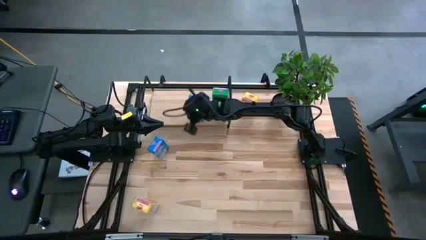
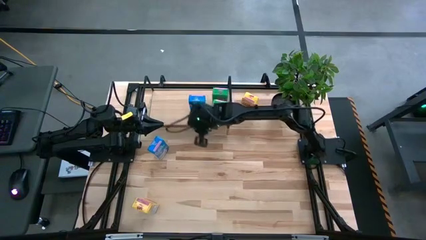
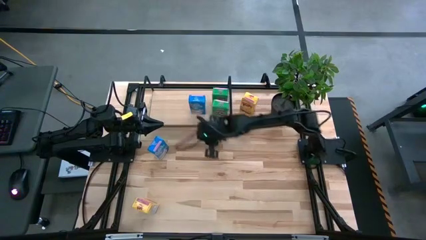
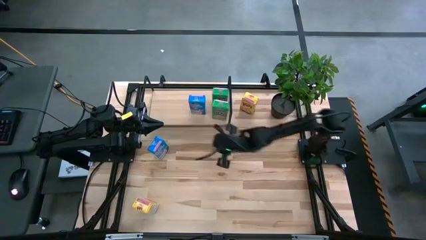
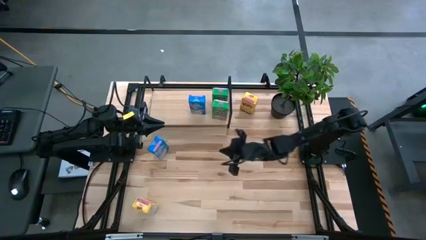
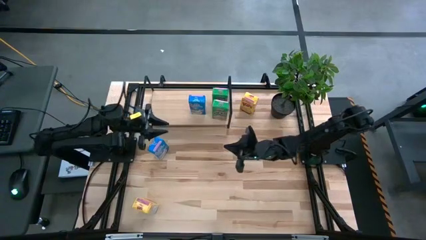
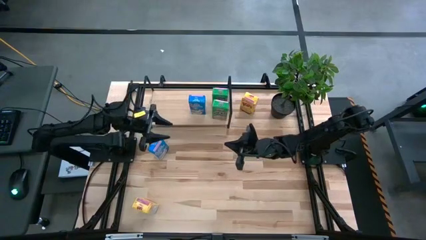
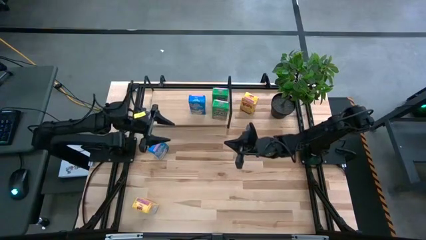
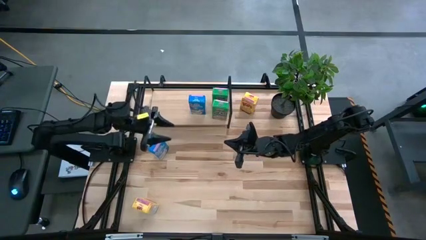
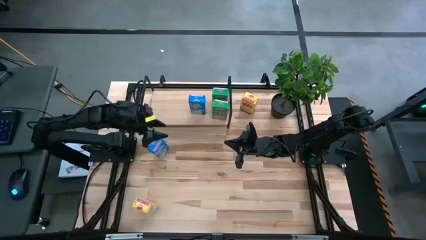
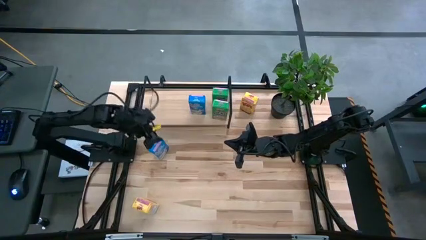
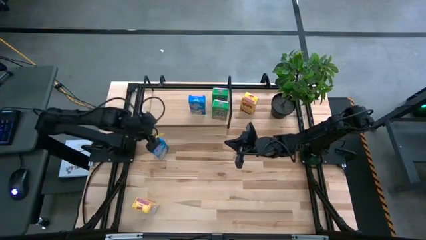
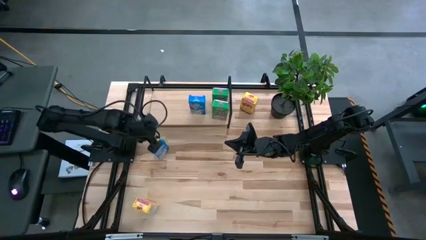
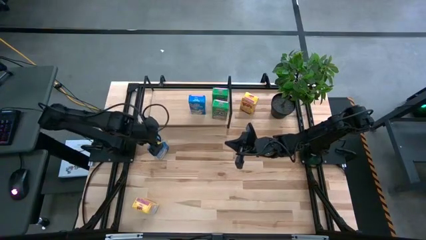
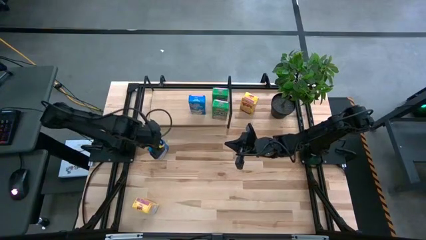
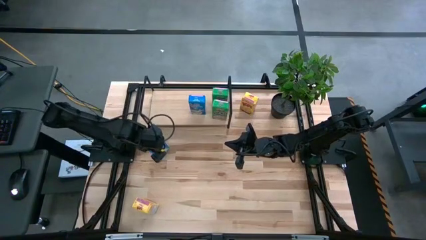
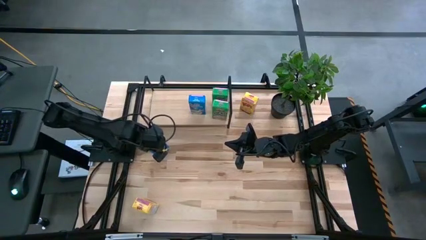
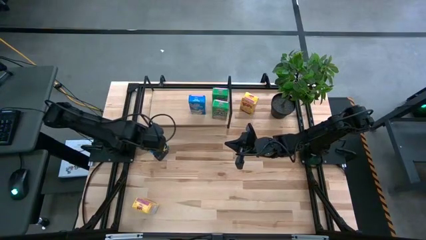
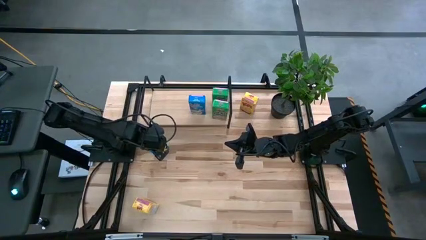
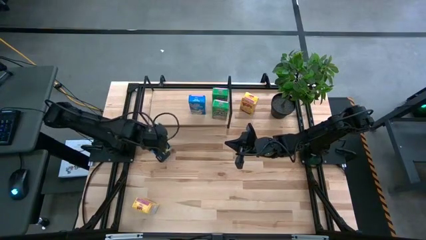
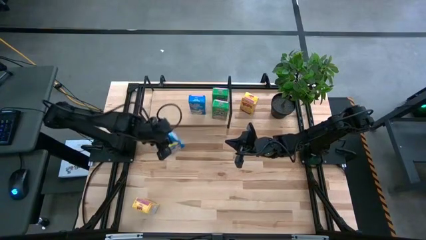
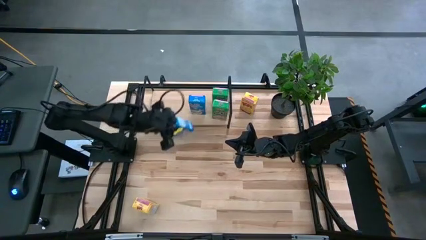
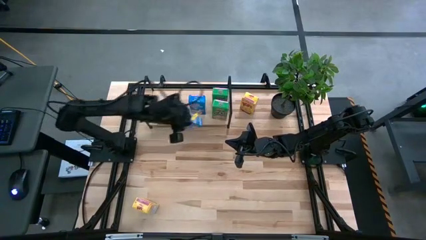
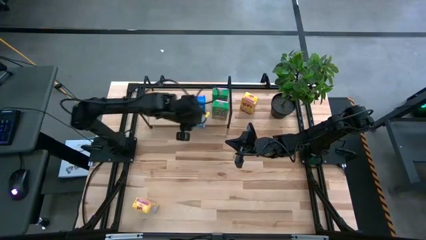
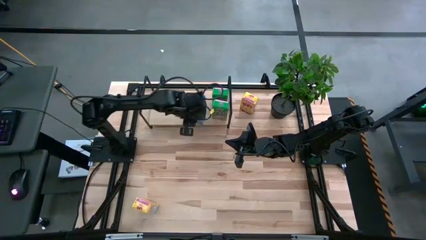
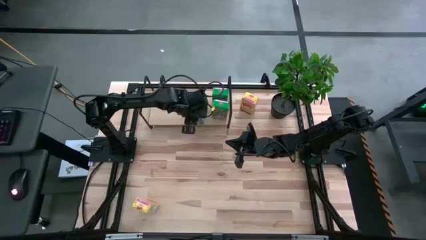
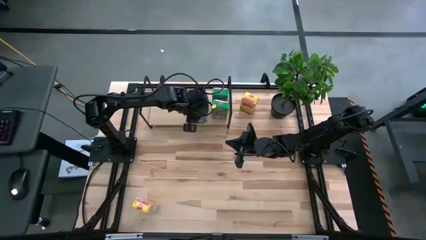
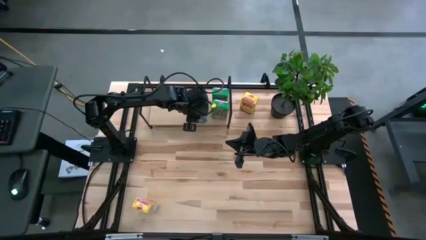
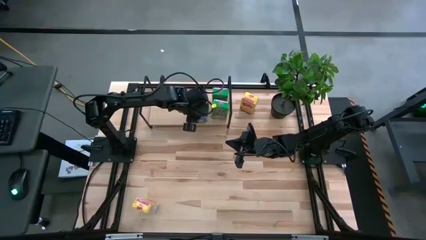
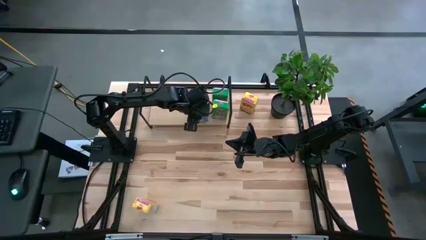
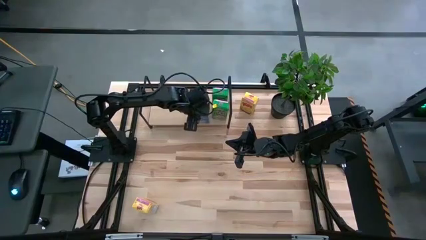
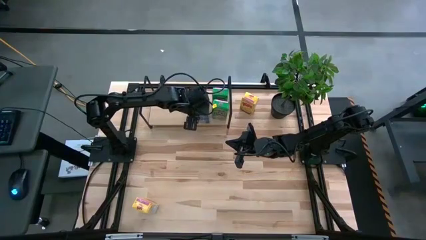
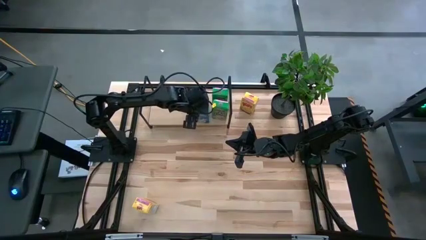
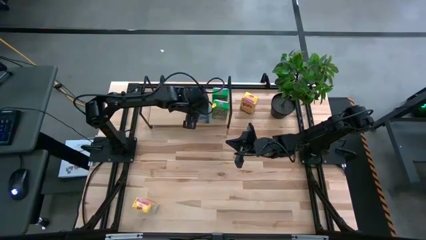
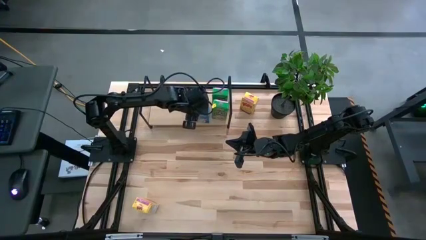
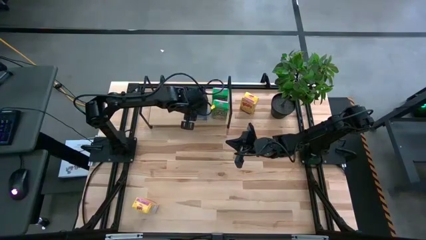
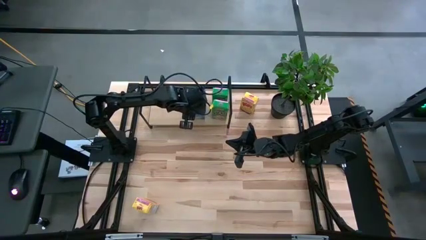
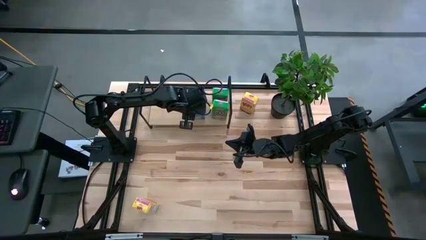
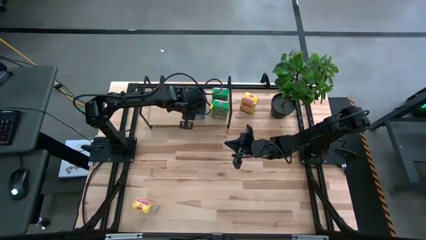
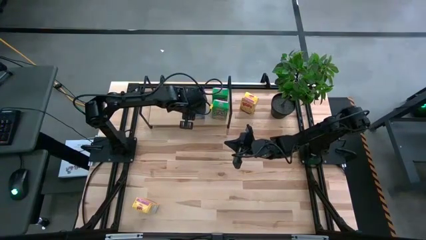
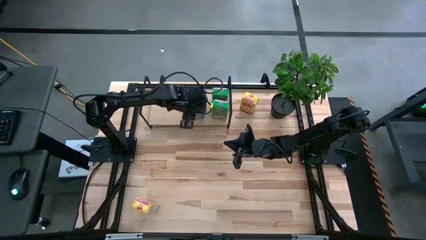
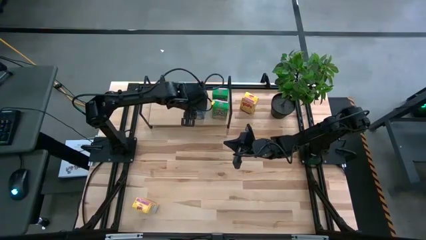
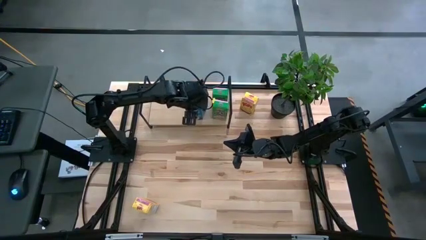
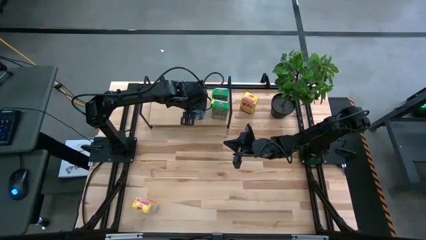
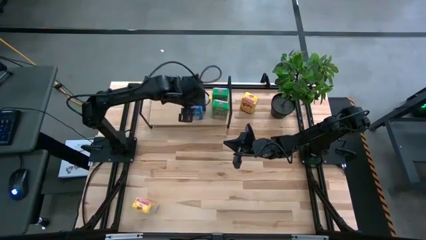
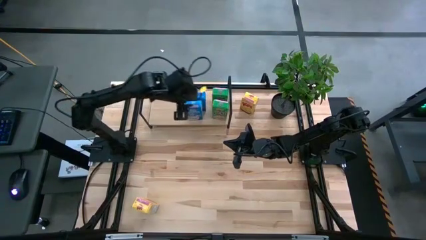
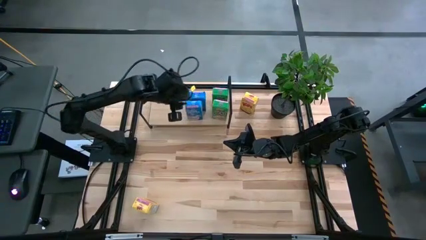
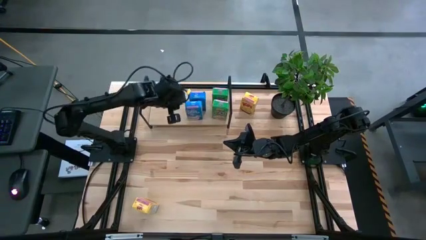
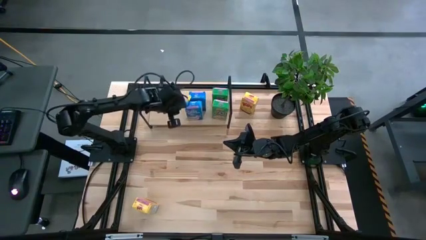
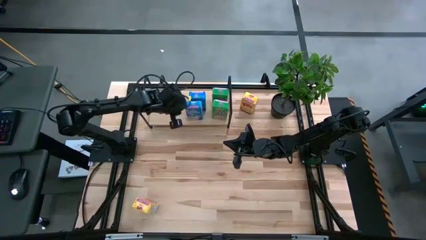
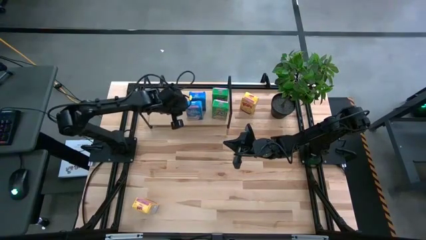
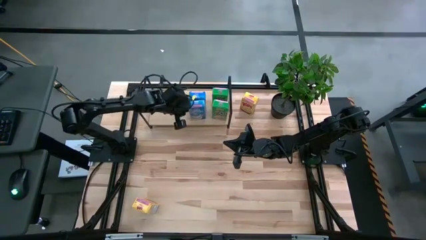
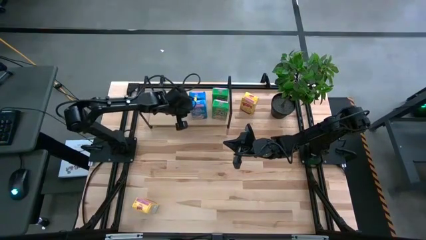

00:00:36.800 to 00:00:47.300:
Task: Stack cereal on shelf
Put the blue cereal box aligned with the other blue cereal box on the shelf

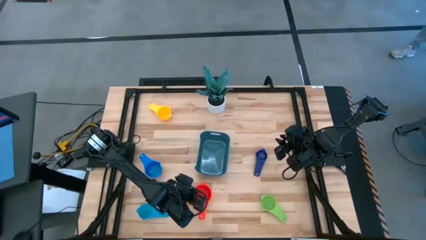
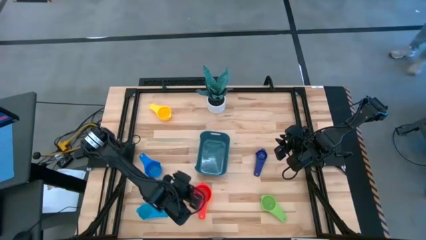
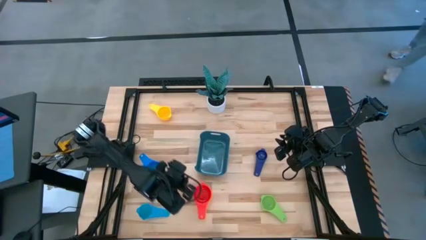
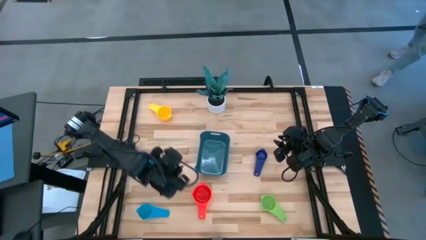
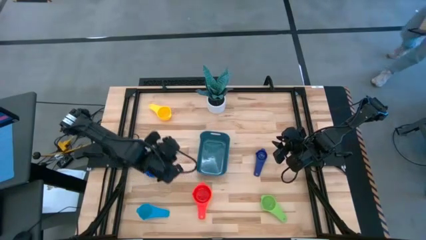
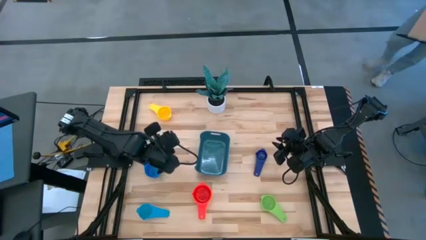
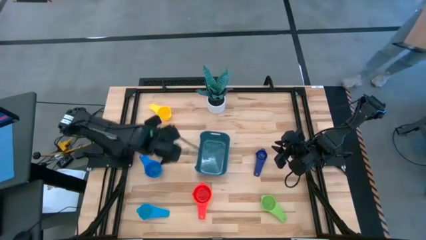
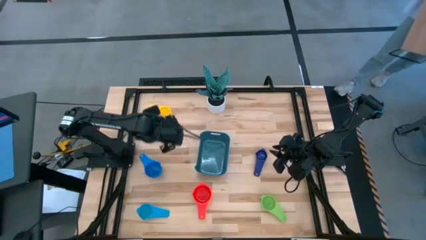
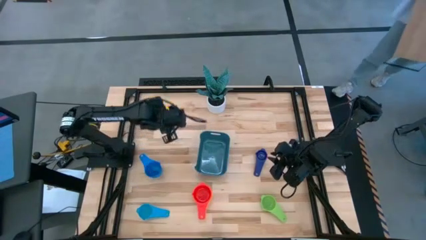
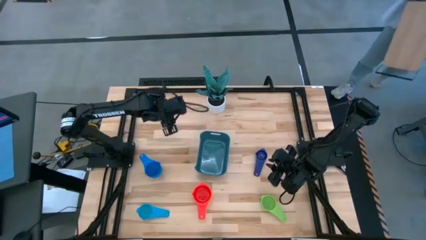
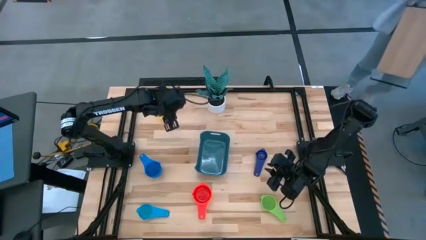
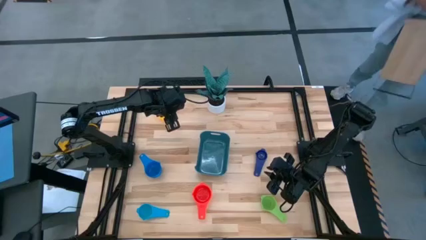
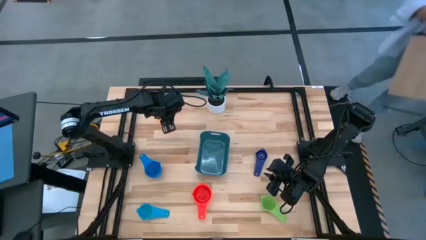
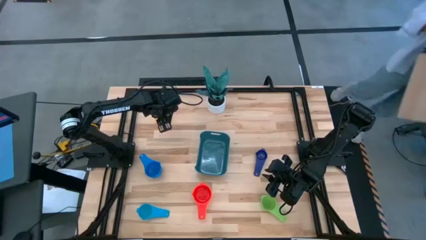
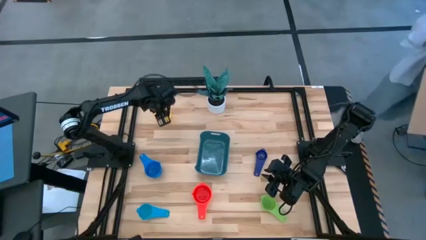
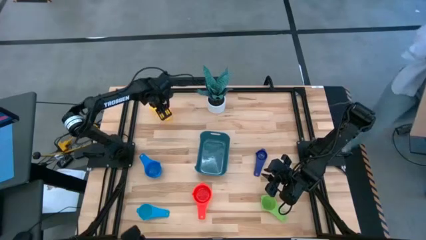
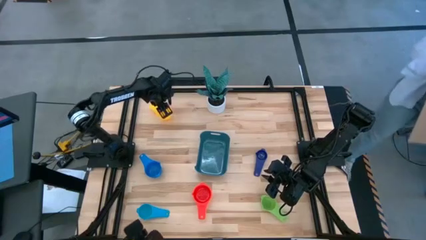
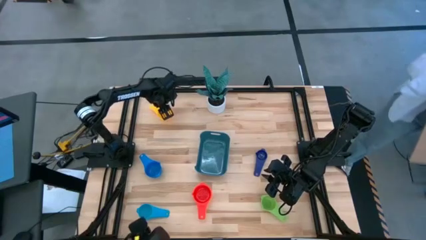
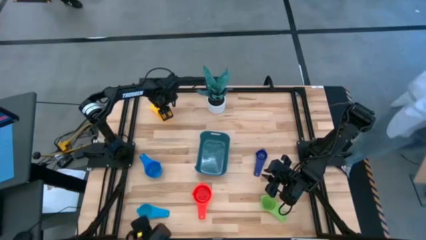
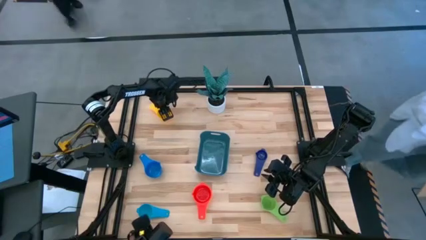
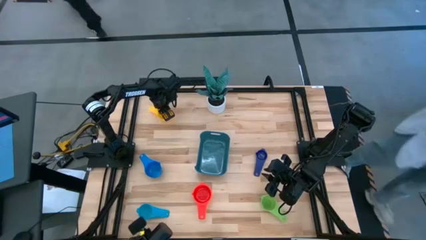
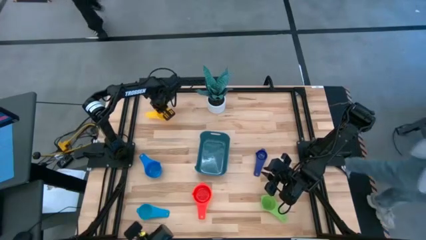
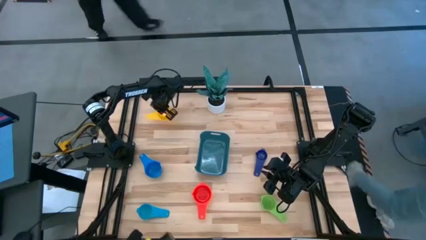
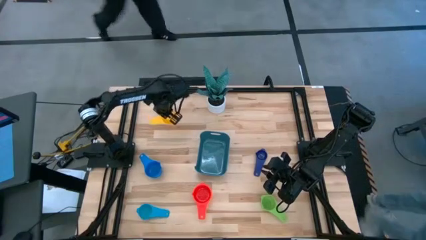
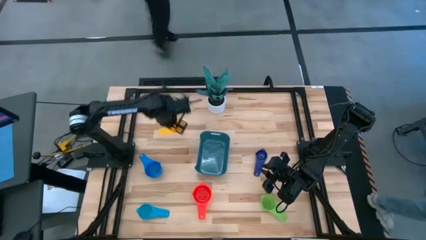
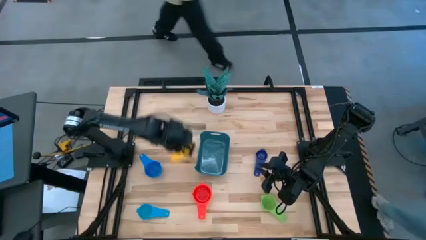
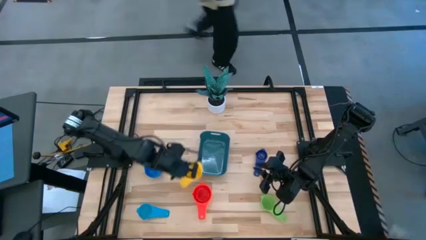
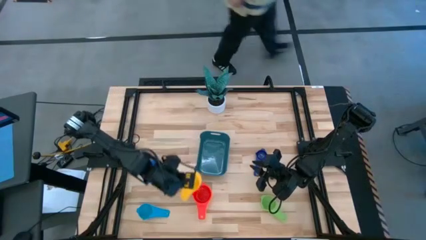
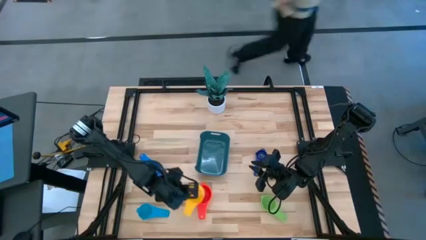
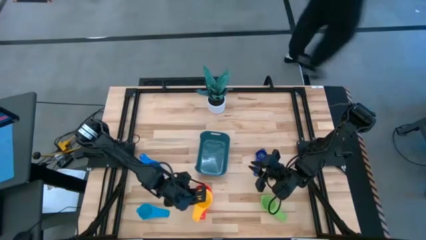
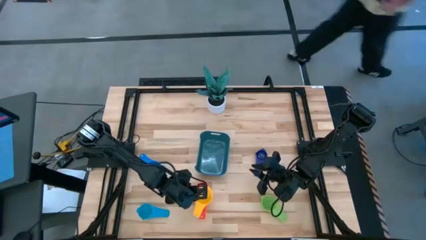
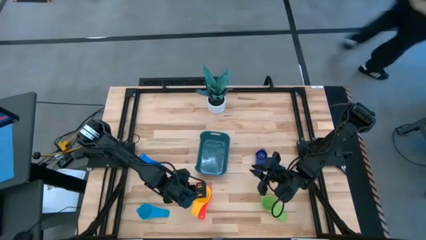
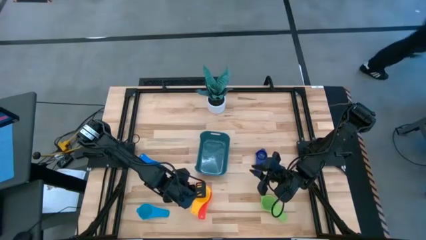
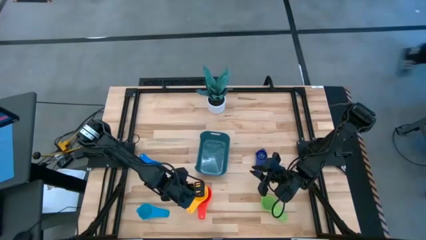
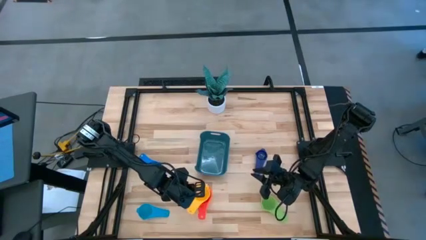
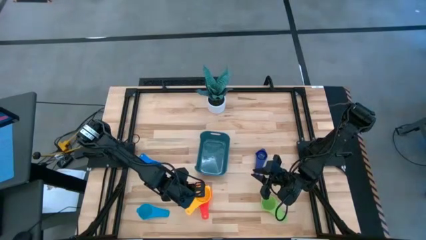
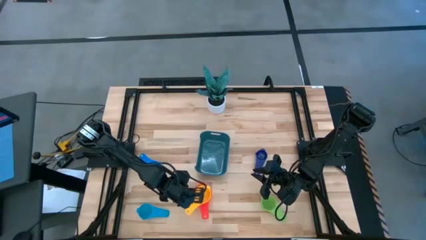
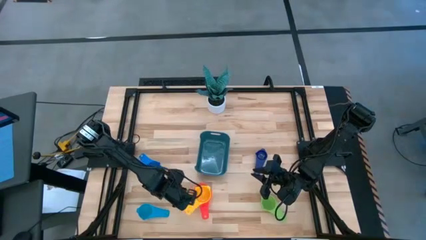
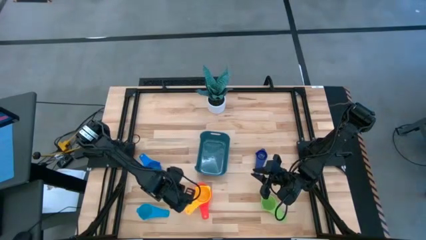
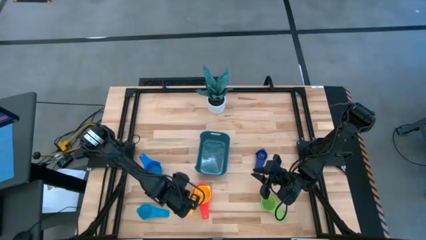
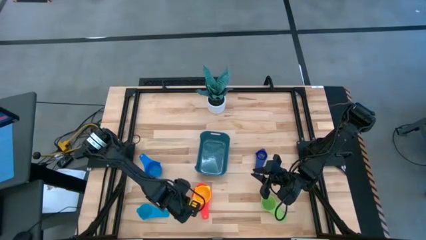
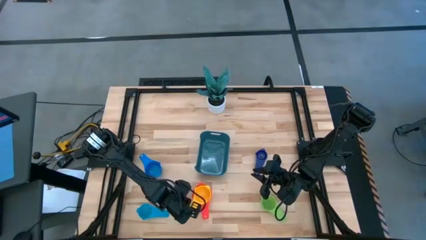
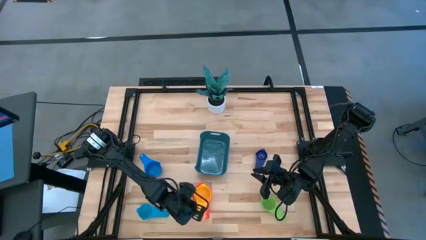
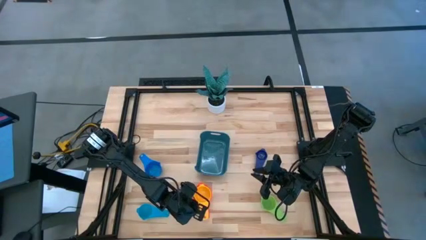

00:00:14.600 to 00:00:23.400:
Task: Nest measuring cups in basket
Stack the yellow measuring cup on top of the red measuring cup
